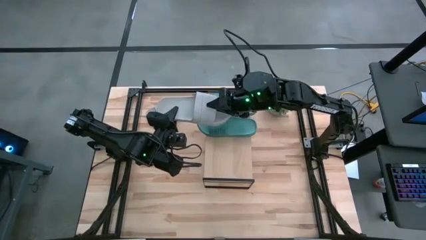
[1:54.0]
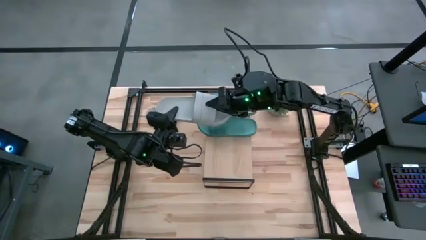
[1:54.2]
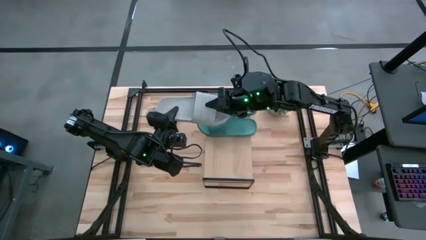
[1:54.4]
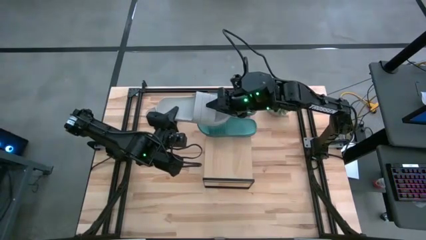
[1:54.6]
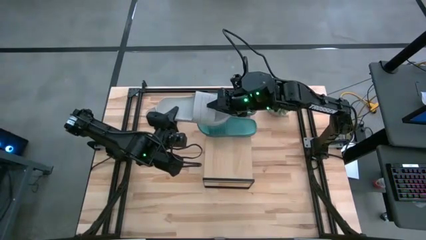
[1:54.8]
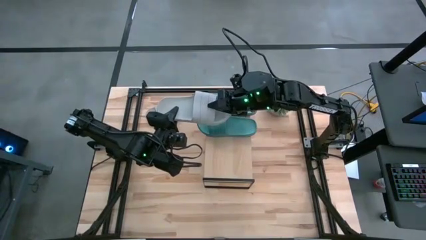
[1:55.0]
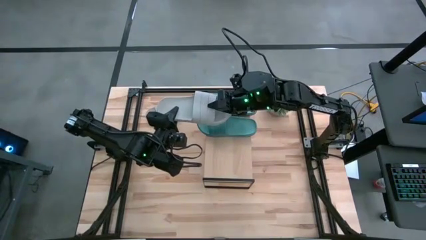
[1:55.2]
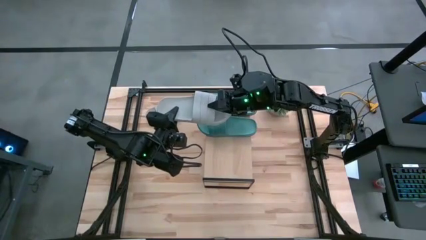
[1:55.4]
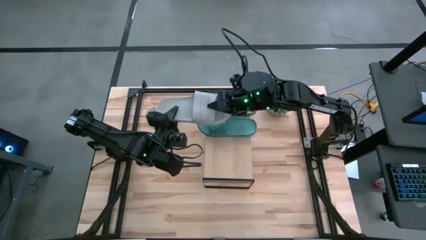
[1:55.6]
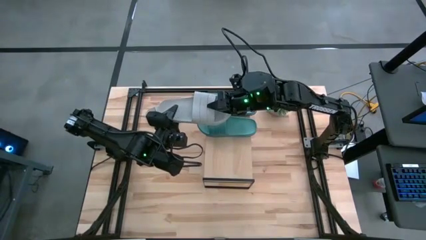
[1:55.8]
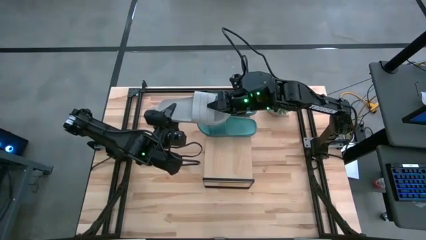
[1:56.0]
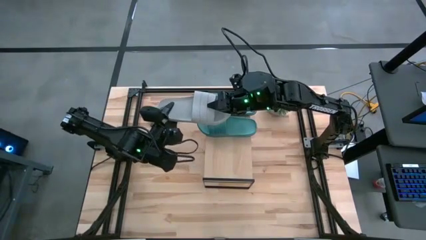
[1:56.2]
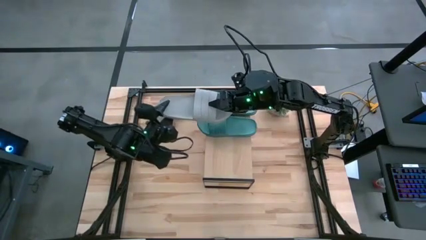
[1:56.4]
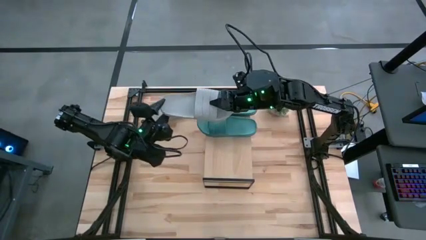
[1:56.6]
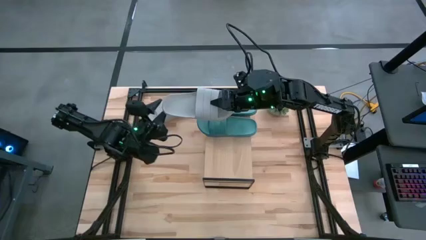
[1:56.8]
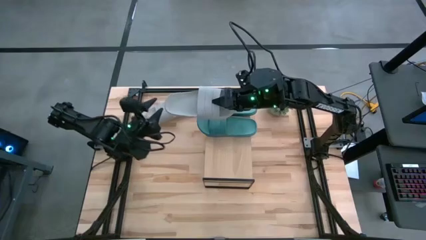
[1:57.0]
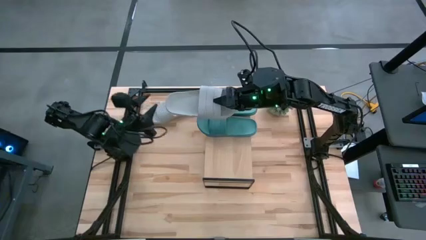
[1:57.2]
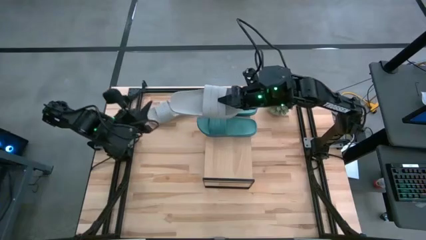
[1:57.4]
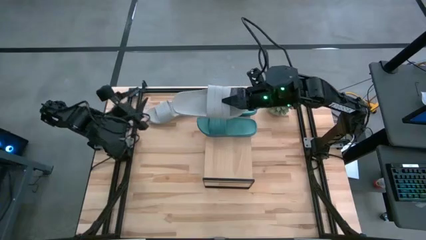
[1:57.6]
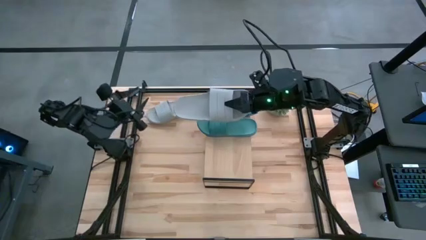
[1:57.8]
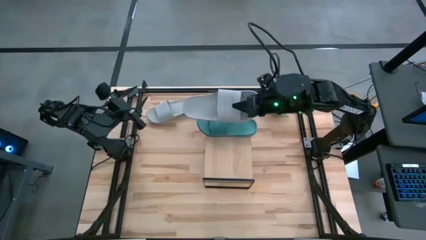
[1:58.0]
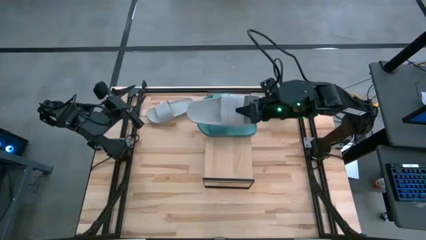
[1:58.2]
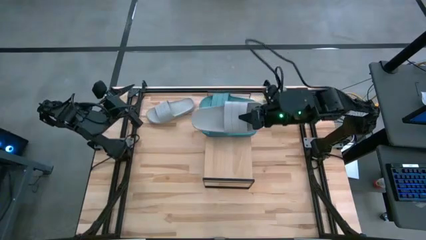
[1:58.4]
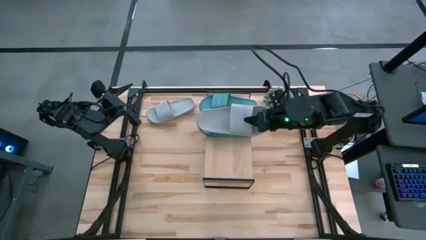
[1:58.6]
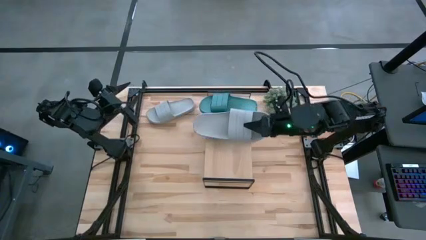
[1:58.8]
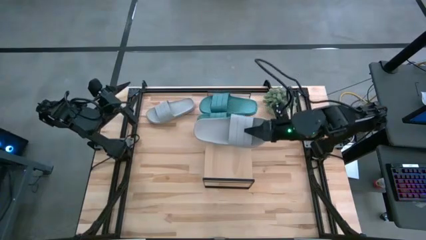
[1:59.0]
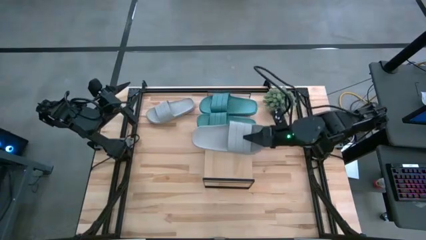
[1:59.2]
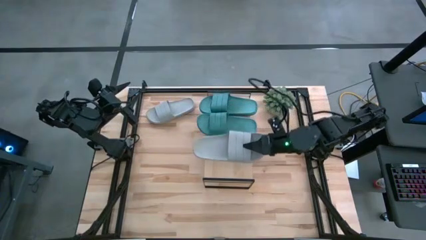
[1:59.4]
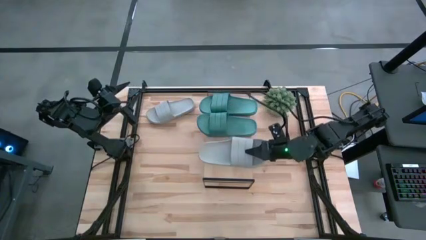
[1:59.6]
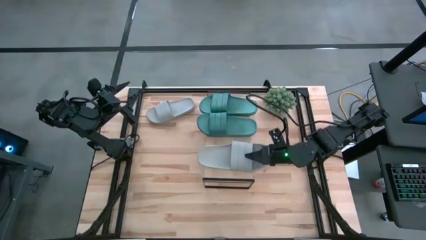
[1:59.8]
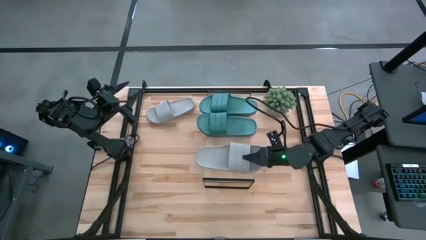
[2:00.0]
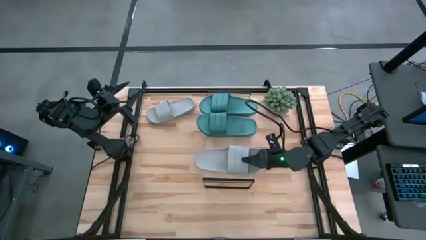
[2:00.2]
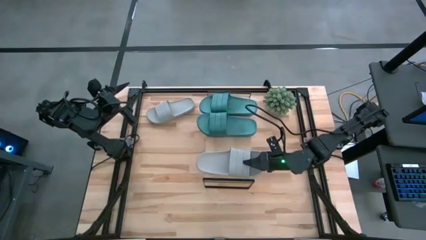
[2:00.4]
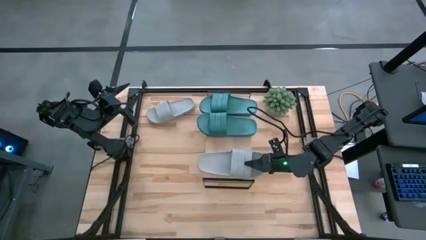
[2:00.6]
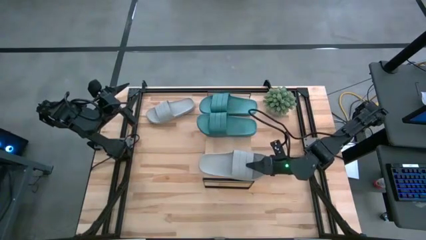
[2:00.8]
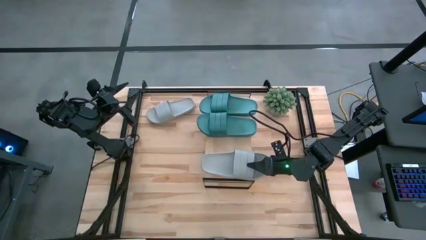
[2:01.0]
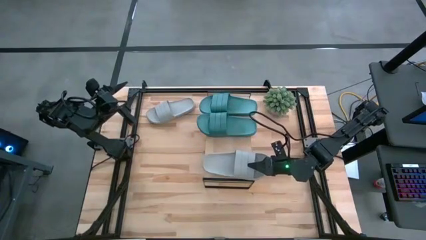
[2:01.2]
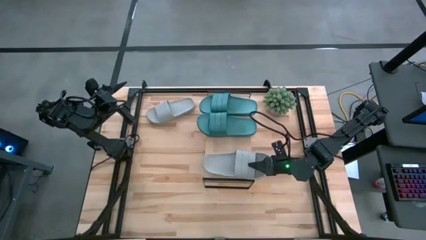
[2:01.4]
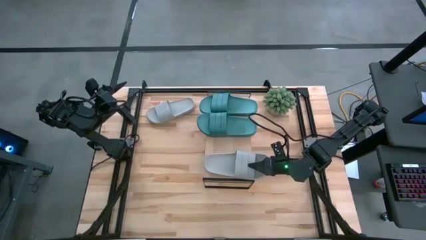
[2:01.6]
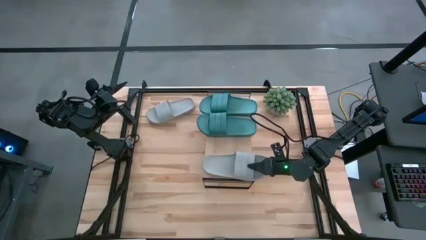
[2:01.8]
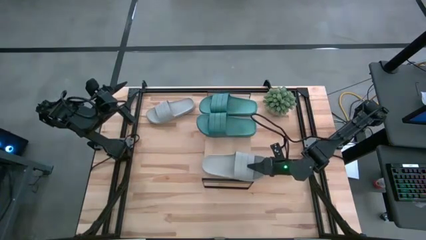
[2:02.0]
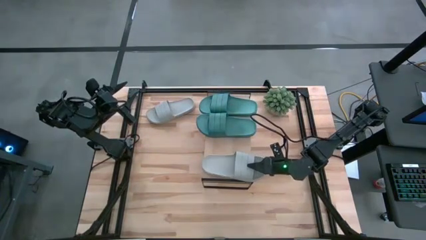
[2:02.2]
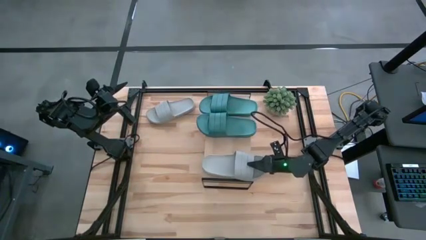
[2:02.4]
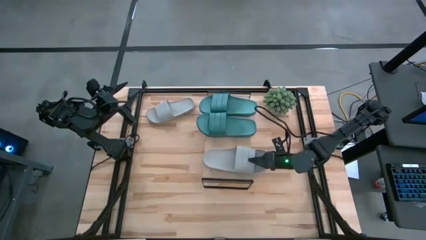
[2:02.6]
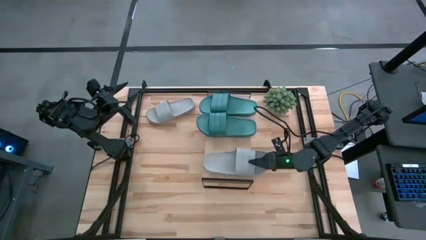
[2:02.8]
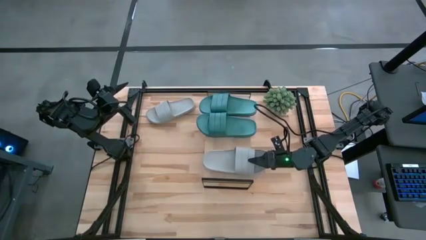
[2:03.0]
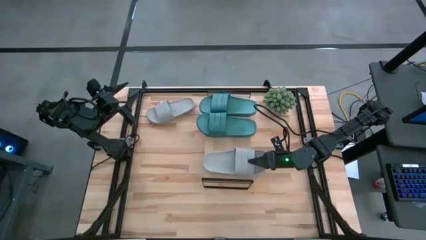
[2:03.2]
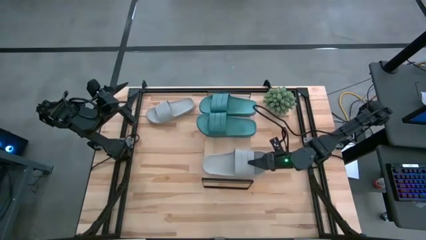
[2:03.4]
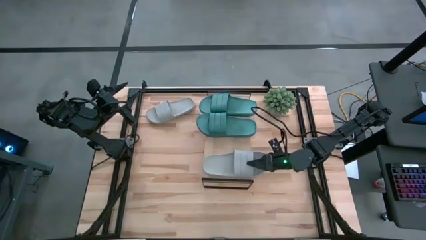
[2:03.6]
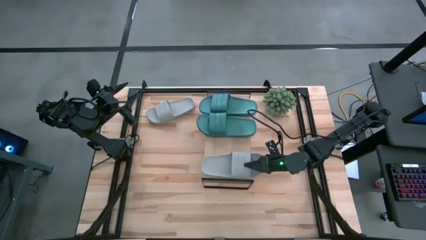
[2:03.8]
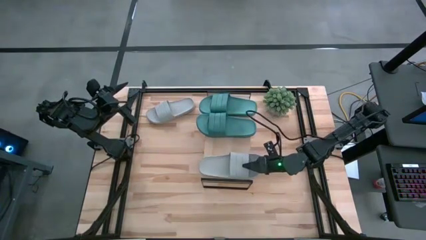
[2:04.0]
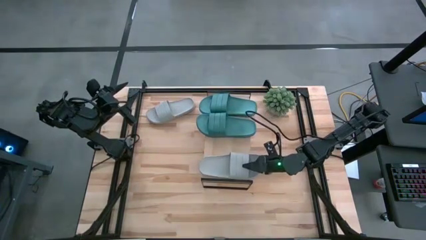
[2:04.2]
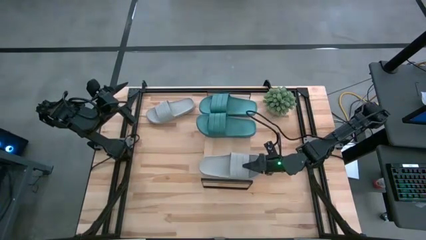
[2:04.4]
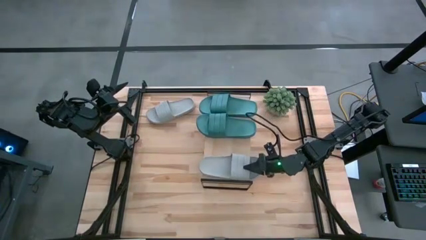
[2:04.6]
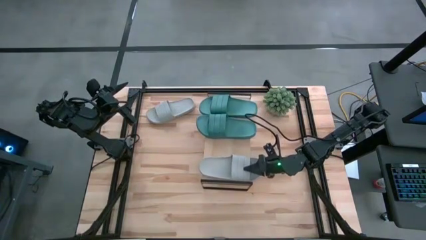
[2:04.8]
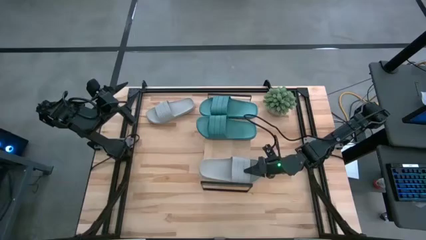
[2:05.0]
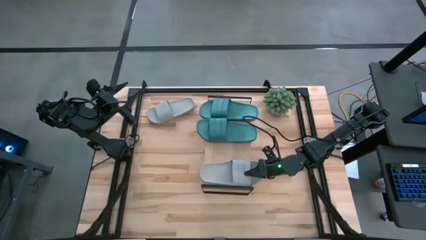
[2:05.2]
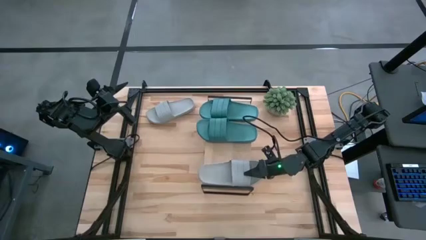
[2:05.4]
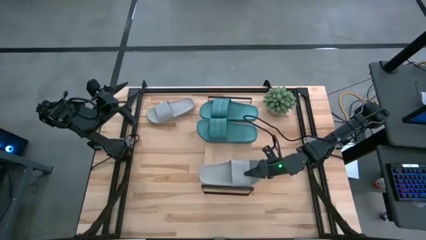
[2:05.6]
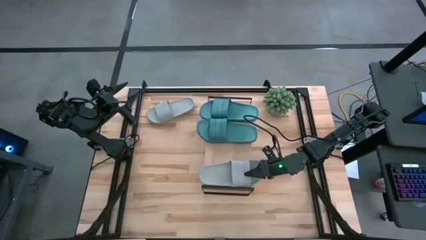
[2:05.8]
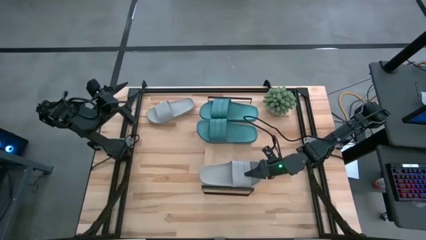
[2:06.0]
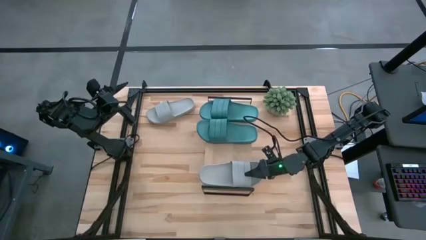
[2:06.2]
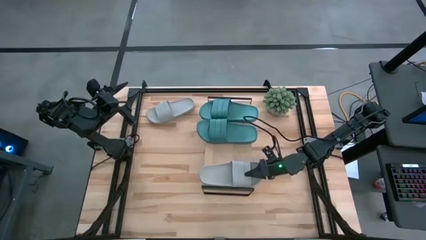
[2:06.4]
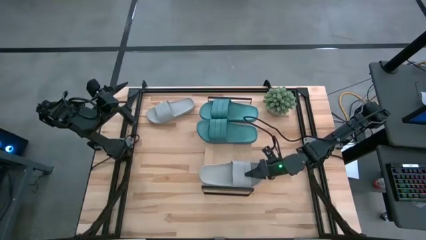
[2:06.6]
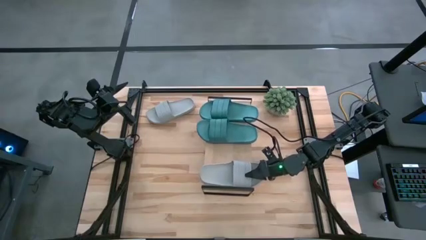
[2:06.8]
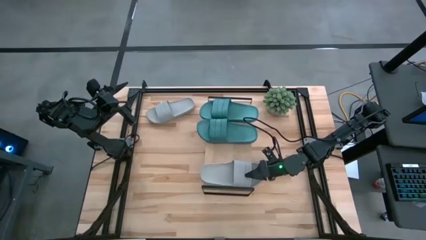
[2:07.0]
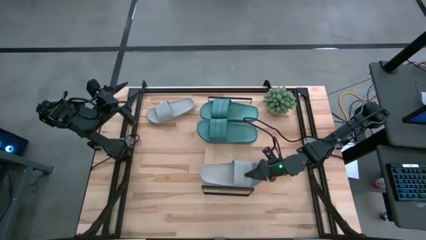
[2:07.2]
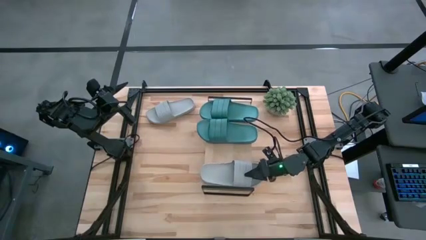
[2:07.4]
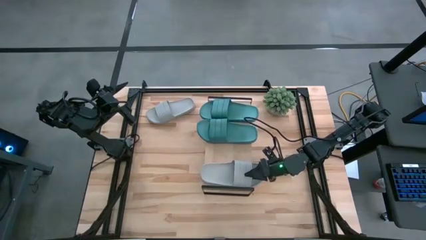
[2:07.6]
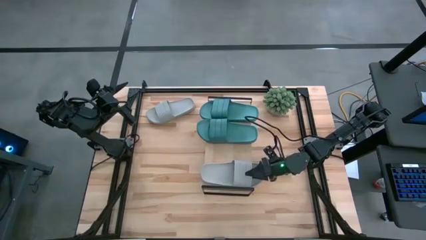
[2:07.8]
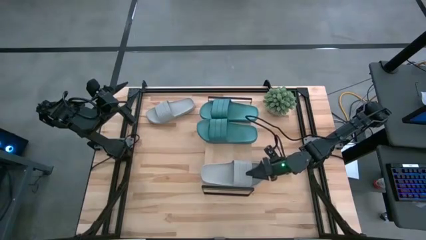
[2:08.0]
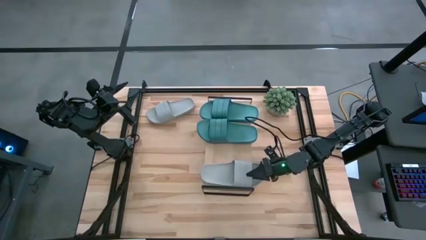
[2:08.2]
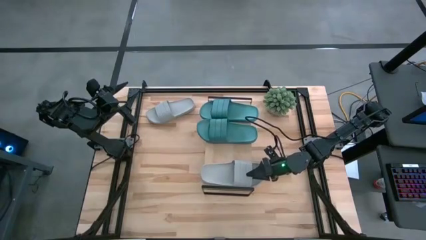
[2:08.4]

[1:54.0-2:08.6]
Task: Pick and place slides into the shelf
Put the bottom gray slide on the shelf
